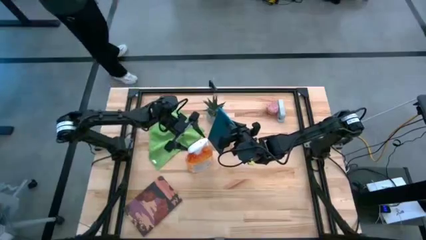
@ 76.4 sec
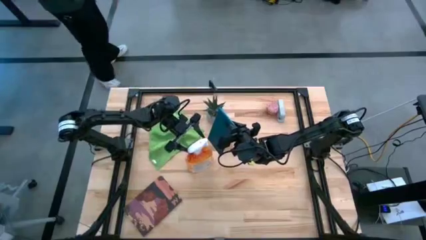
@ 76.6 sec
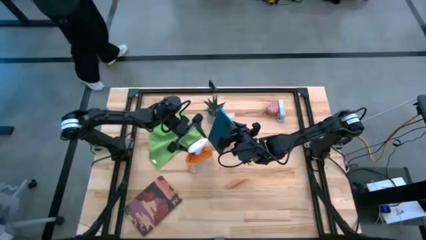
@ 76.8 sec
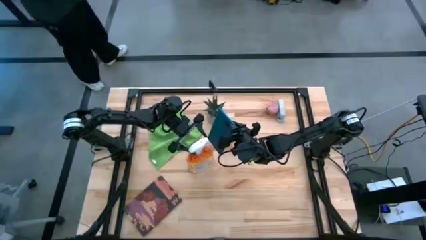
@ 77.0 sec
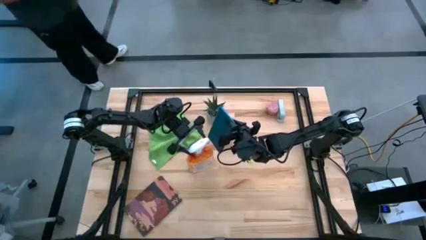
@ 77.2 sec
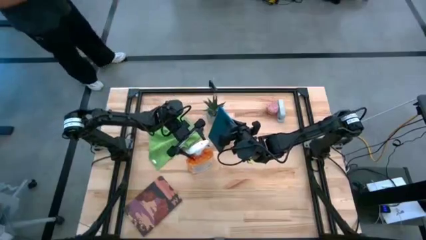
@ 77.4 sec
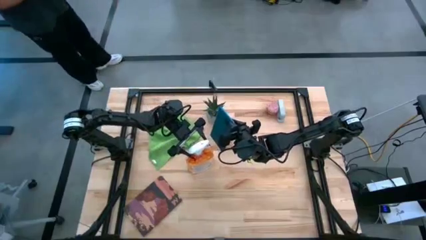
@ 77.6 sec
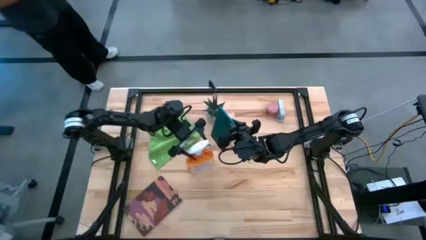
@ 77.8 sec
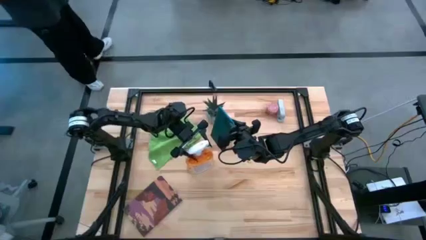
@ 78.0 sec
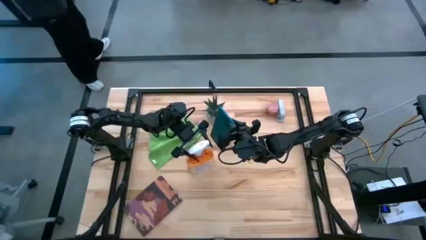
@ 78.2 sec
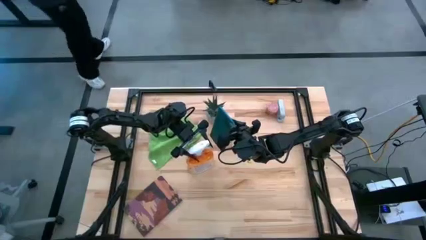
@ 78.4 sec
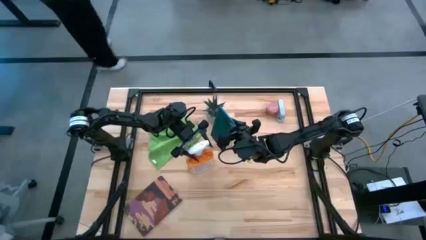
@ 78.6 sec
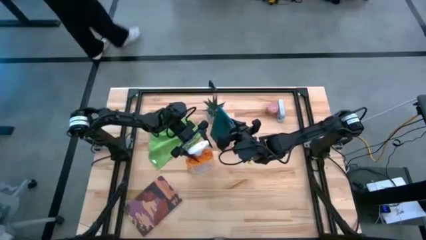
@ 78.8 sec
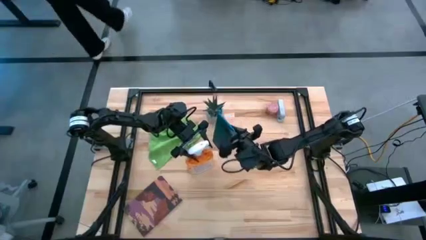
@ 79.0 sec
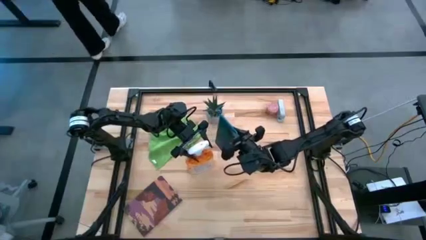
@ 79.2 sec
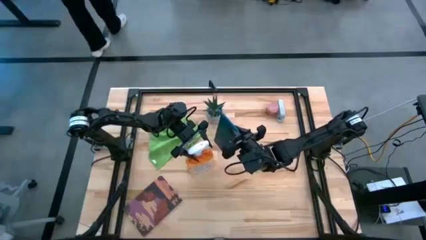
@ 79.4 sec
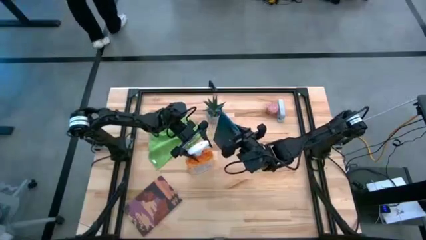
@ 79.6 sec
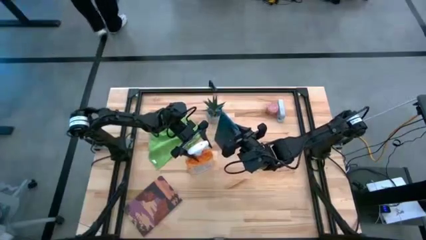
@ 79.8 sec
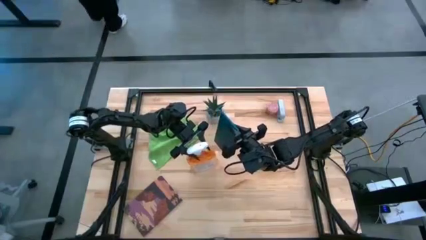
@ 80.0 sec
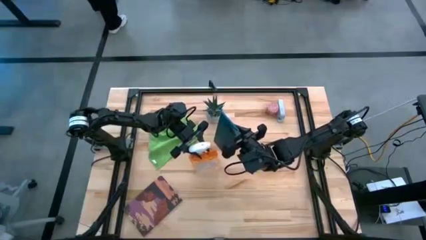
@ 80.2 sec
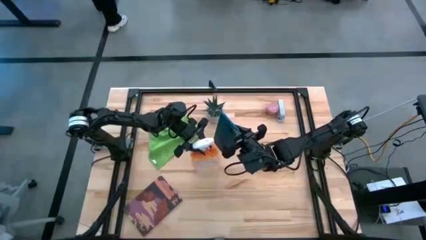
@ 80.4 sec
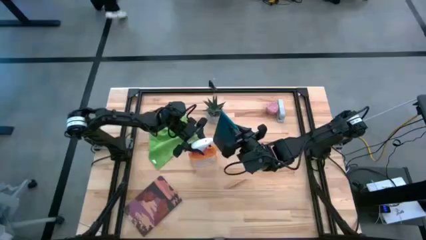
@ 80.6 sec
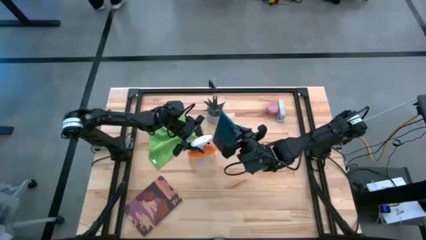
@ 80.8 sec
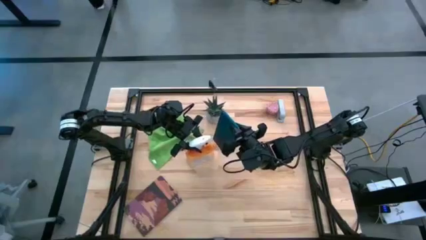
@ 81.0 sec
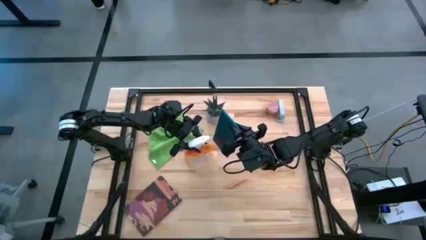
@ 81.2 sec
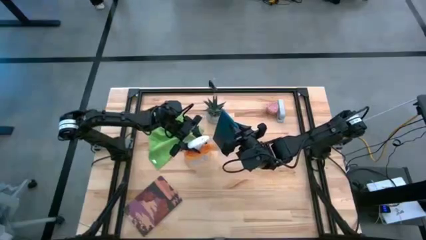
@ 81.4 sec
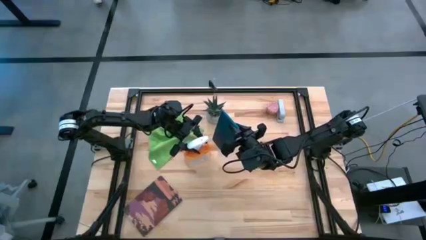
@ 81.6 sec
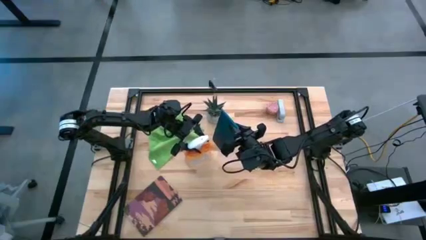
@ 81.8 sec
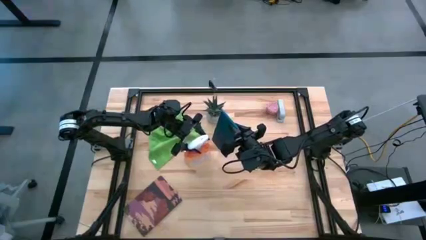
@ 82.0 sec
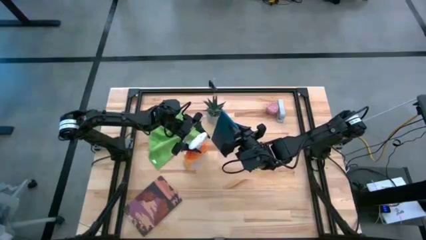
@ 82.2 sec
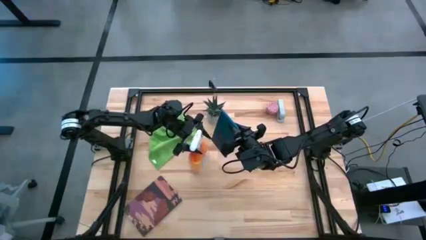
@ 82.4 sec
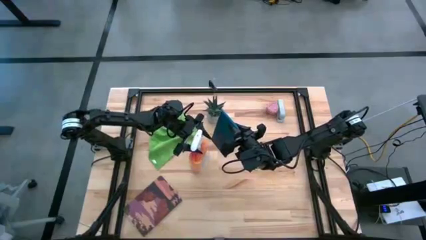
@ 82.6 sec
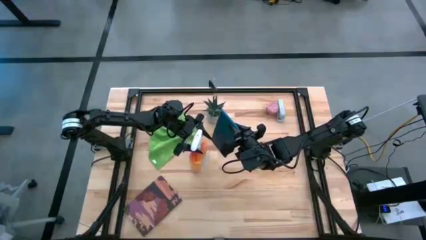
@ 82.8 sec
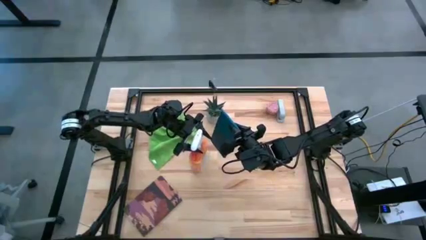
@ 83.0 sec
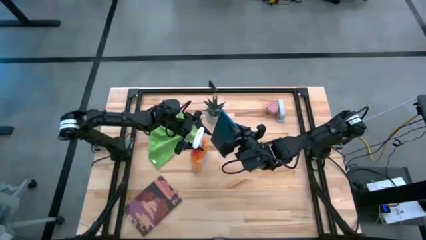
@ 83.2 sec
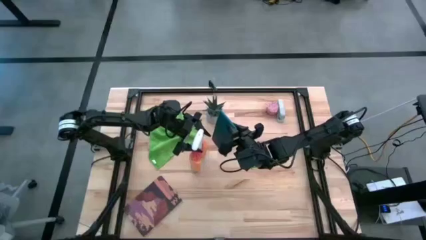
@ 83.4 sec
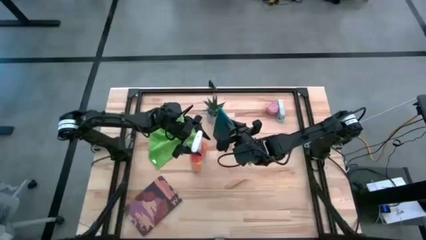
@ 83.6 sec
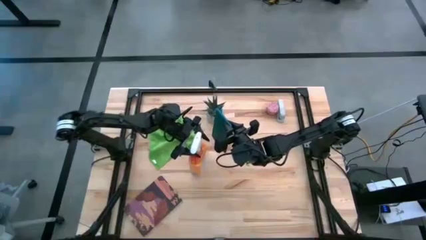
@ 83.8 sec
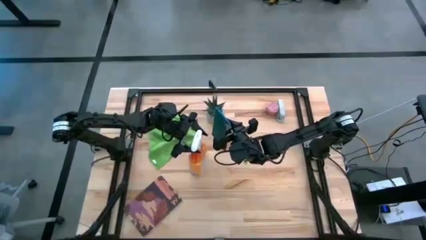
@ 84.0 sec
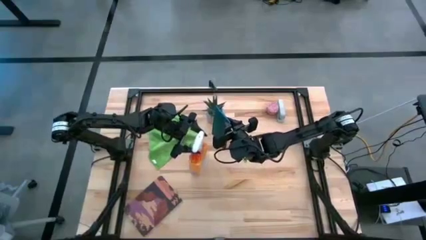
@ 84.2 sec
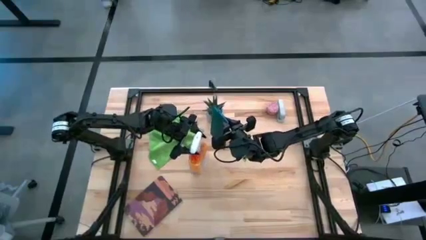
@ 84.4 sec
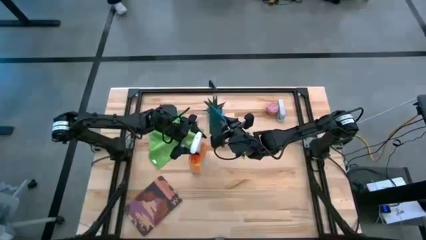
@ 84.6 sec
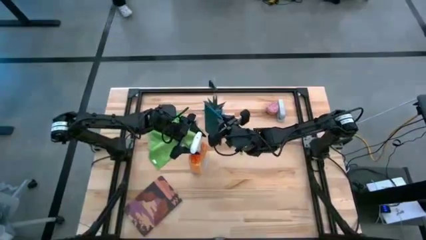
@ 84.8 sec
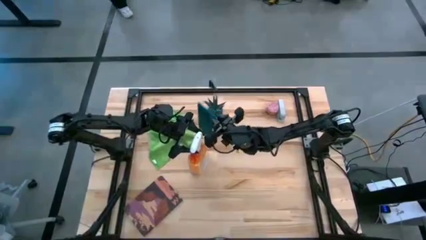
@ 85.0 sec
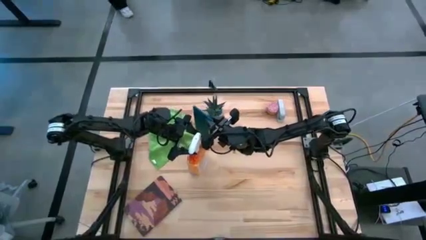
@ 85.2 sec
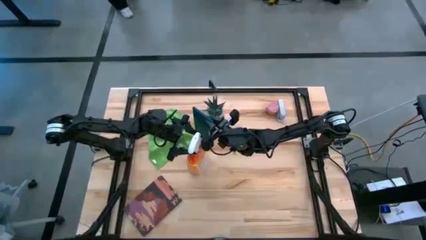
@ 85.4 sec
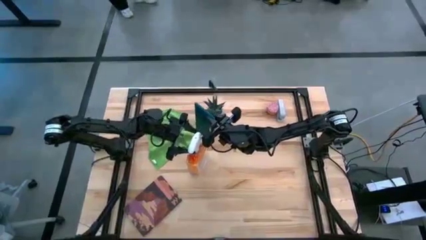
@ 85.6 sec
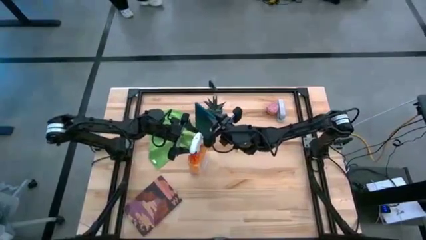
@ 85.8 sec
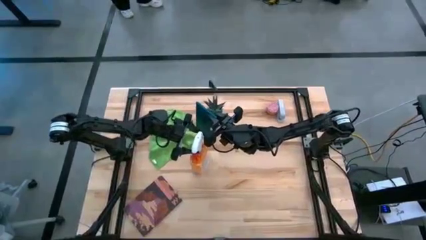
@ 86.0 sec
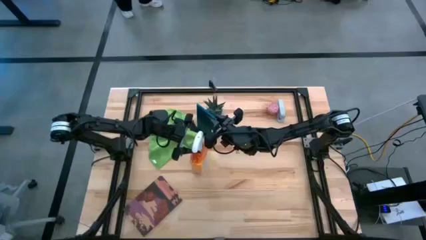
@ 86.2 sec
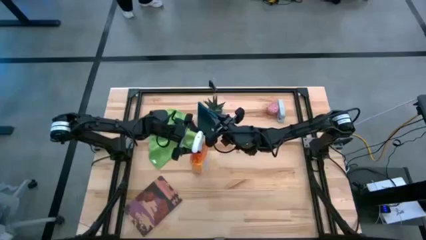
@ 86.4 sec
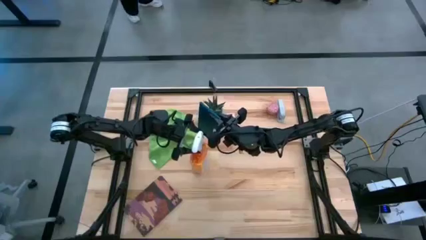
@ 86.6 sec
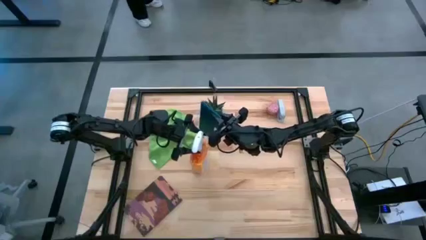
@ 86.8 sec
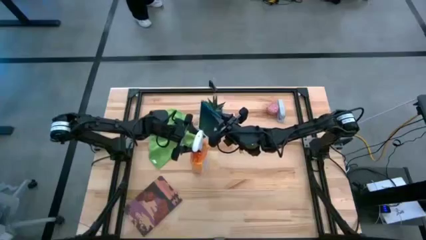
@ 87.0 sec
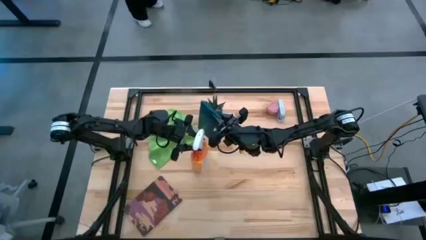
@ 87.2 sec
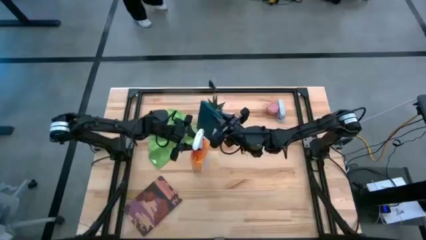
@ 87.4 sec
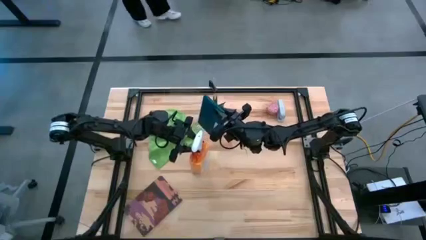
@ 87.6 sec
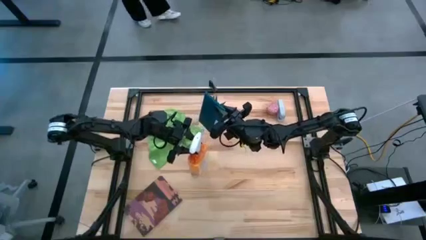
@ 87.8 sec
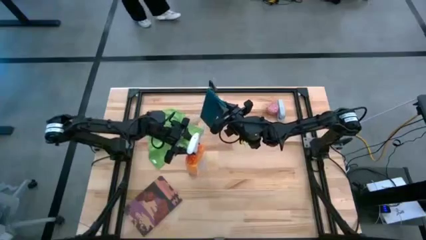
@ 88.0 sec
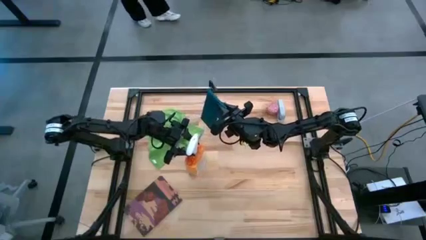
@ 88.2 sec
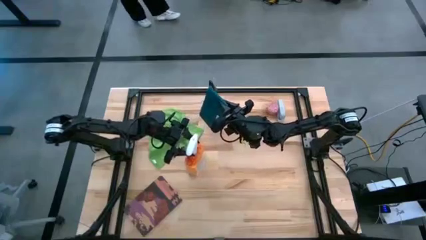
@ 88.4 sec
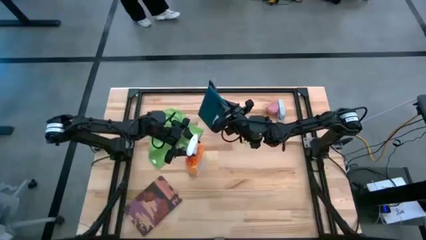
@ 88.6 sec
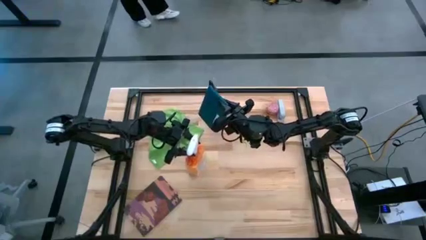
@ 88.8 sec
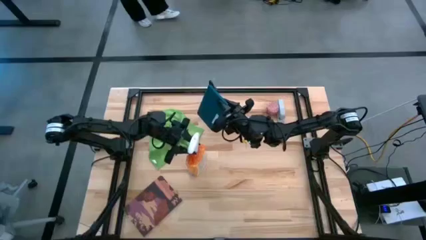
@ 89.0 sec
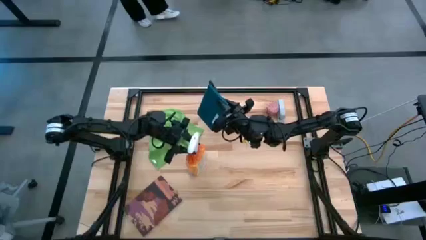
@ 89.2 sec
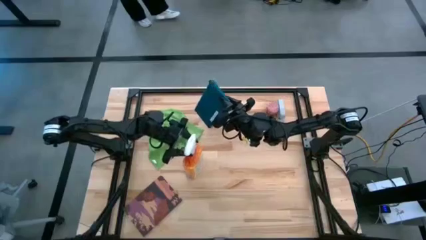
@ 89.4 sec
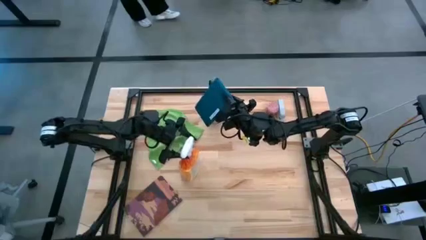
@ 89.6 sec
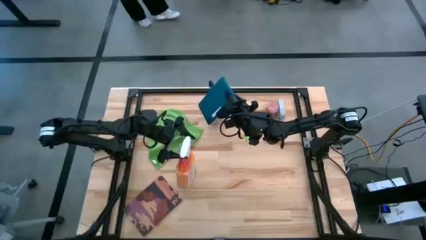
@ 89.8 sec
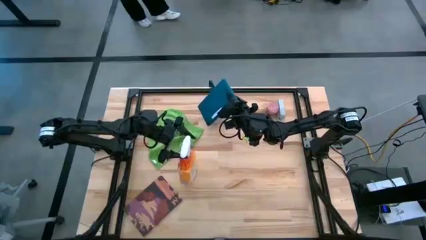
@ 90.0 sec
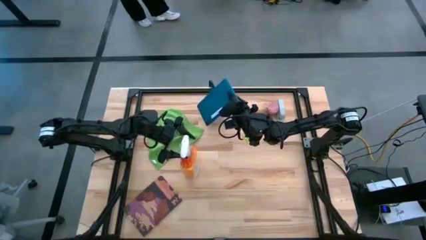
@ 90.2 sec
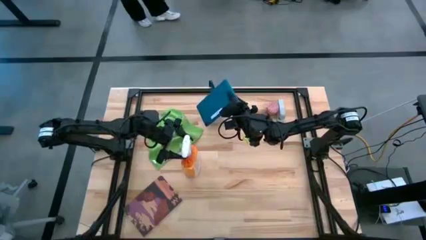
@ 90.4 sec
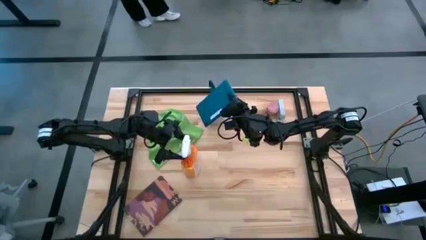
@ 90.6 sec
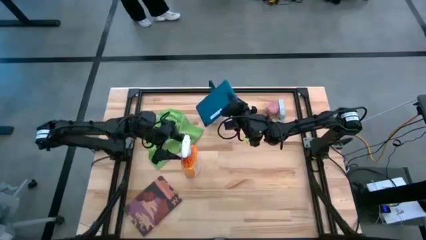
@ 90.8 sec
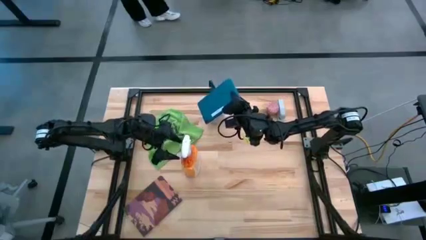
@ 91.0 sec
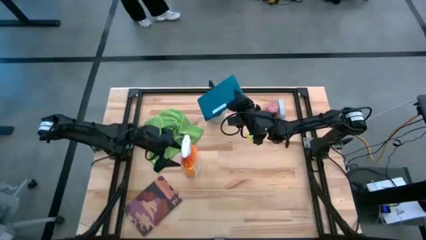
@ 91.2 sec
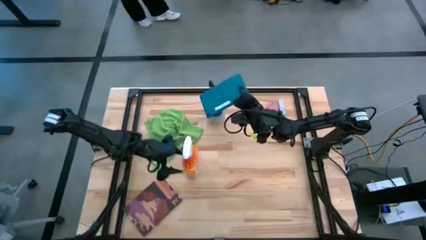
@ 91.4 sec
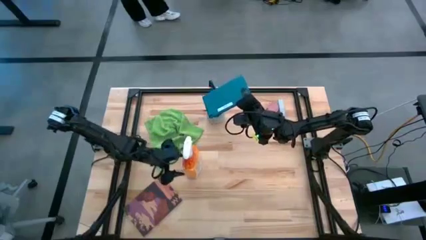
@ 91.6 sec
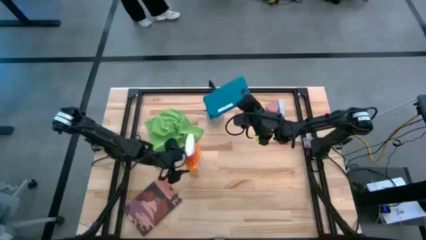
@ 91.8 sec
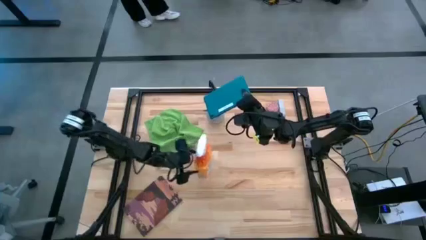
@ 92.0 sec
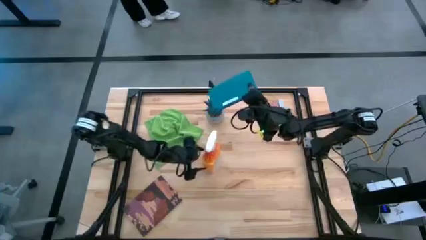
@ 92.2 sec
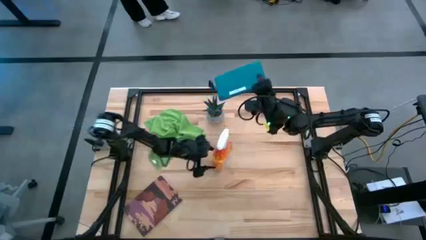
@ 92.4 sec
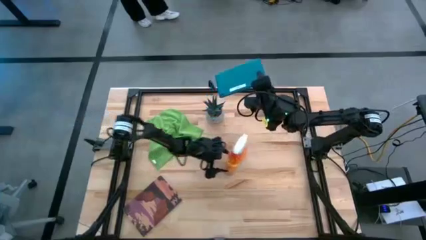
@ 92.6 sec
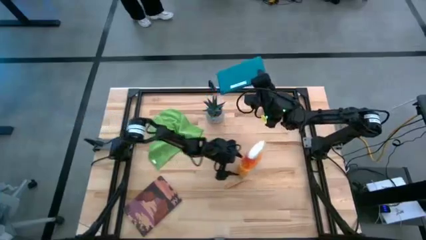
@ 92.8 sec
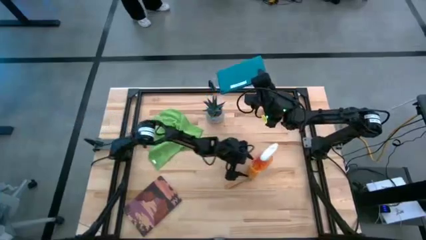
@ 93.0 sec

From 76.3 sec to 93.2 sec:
Task: Apply microfiber cloth
Spray the front and back of the tablet with the spray bottle
